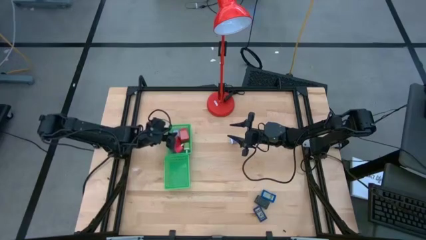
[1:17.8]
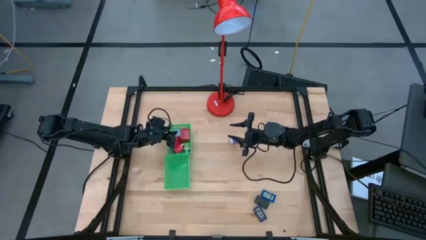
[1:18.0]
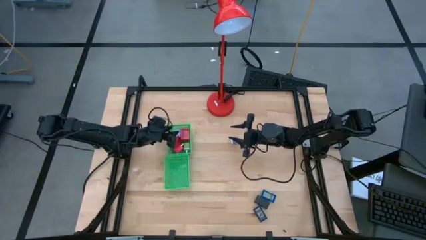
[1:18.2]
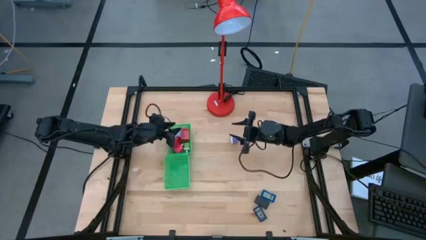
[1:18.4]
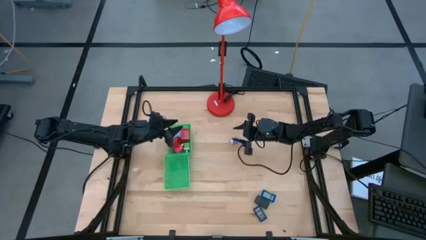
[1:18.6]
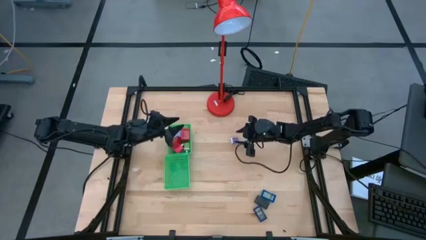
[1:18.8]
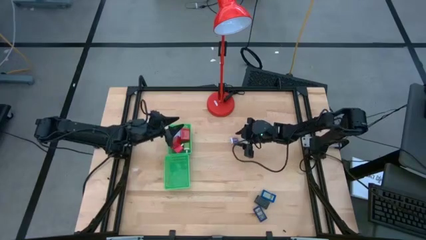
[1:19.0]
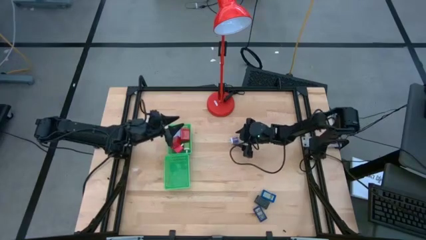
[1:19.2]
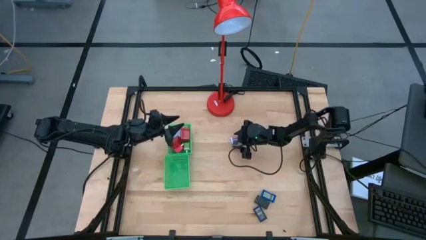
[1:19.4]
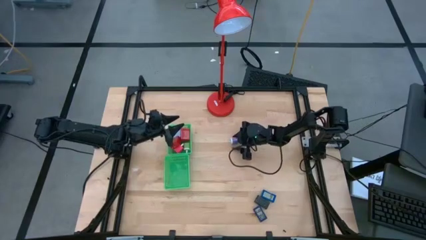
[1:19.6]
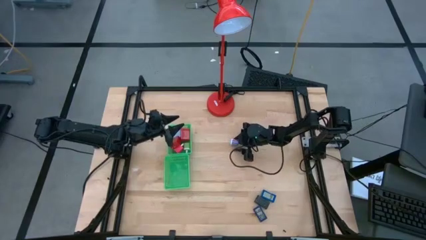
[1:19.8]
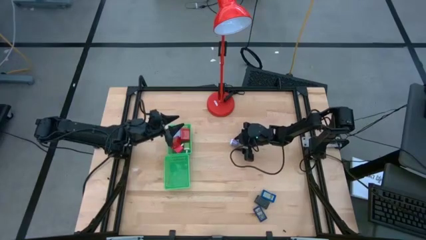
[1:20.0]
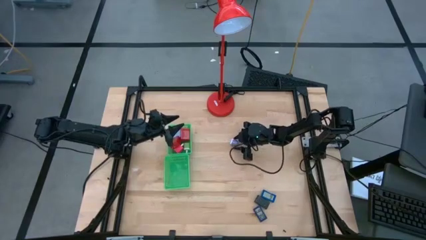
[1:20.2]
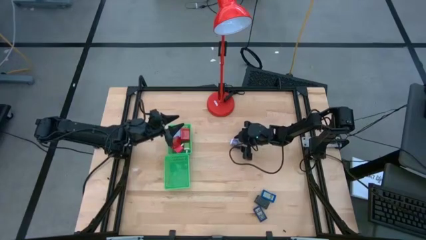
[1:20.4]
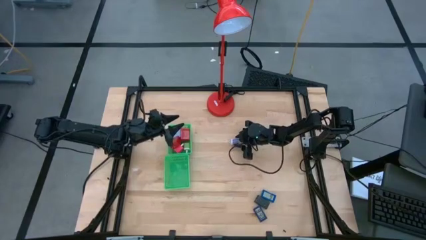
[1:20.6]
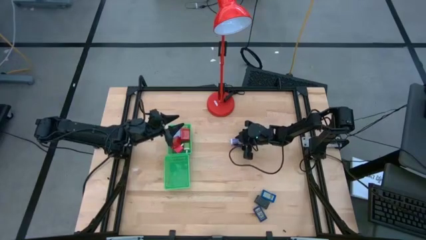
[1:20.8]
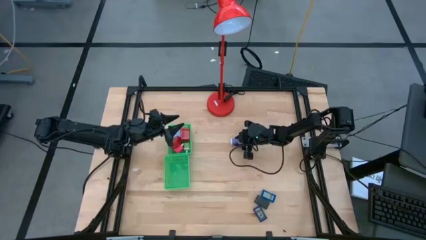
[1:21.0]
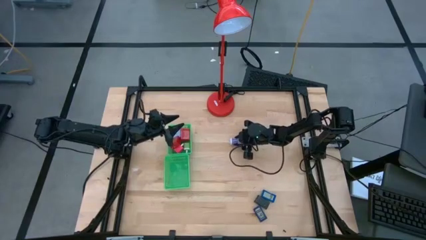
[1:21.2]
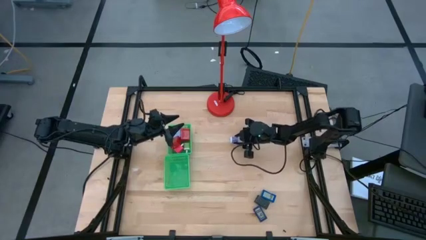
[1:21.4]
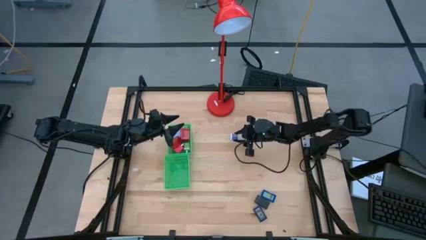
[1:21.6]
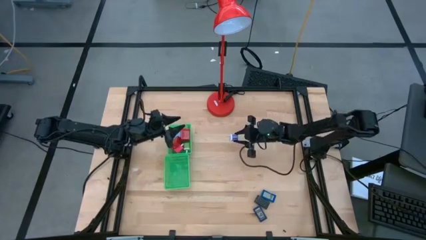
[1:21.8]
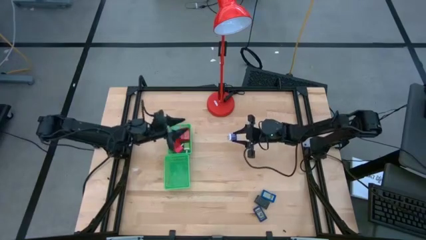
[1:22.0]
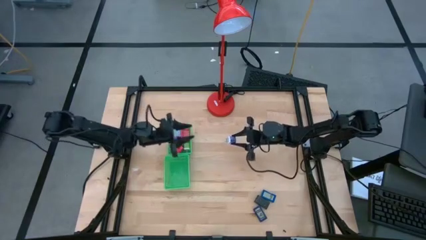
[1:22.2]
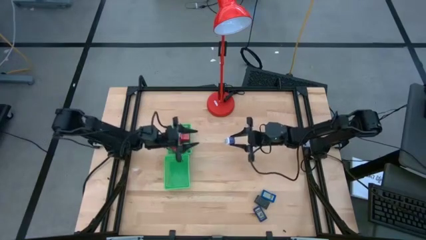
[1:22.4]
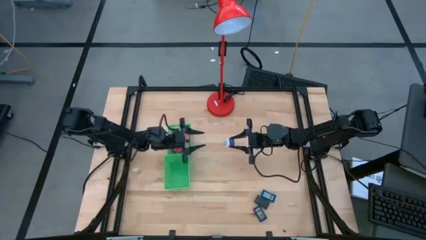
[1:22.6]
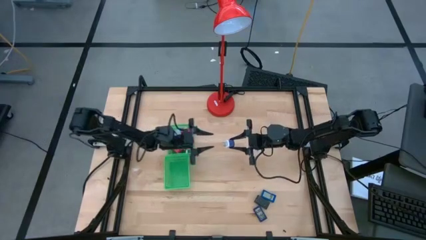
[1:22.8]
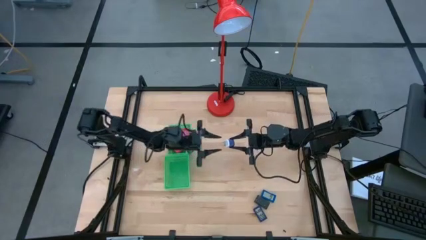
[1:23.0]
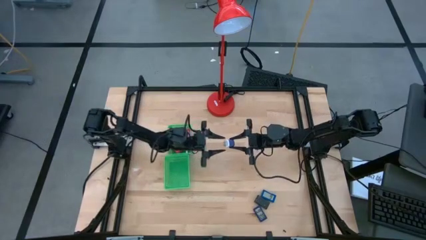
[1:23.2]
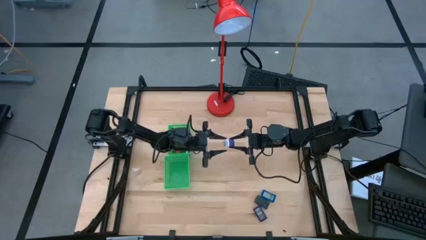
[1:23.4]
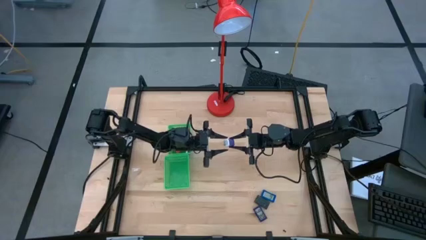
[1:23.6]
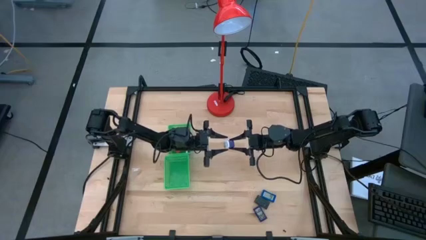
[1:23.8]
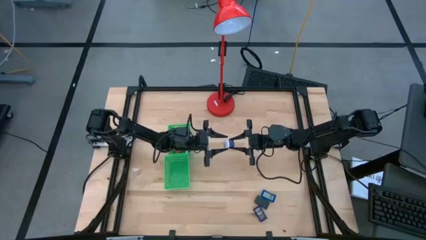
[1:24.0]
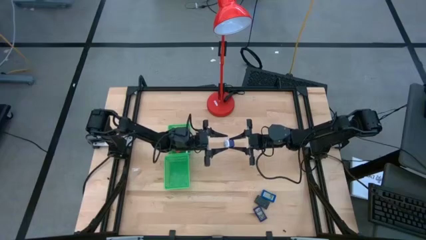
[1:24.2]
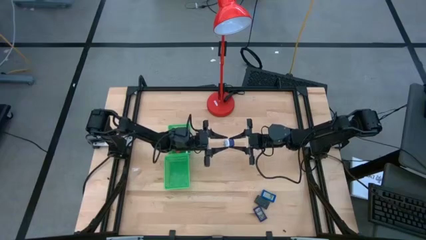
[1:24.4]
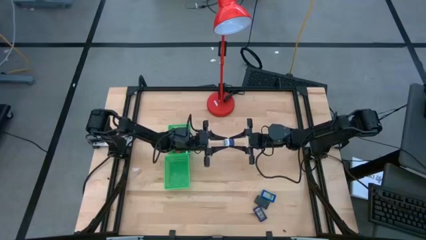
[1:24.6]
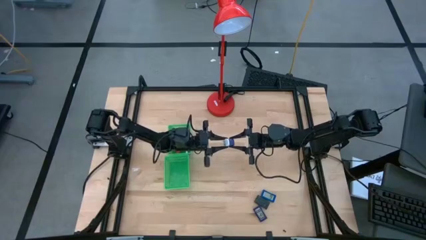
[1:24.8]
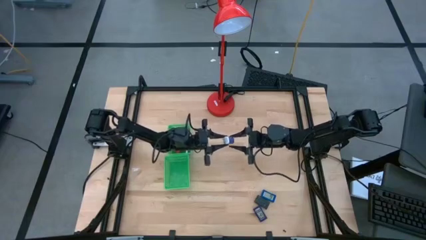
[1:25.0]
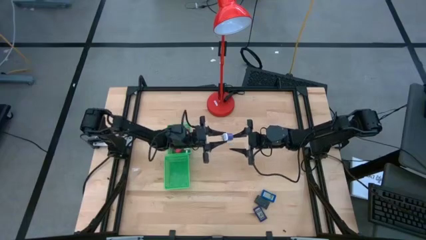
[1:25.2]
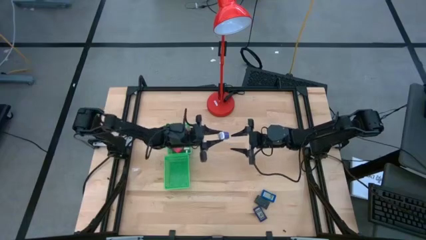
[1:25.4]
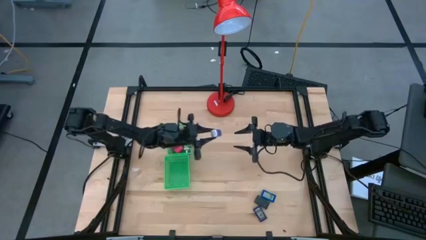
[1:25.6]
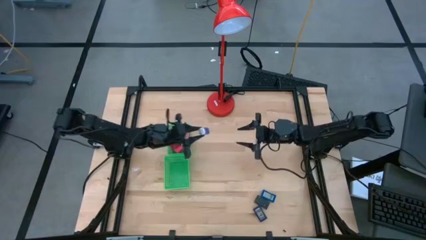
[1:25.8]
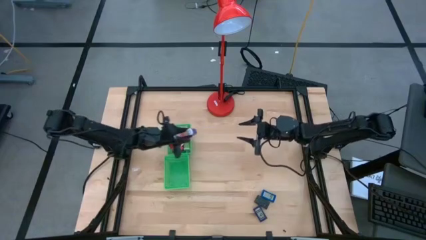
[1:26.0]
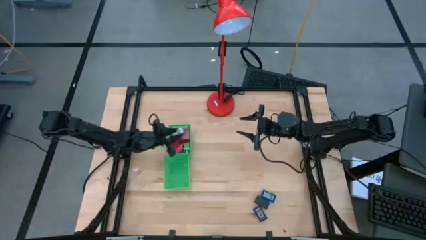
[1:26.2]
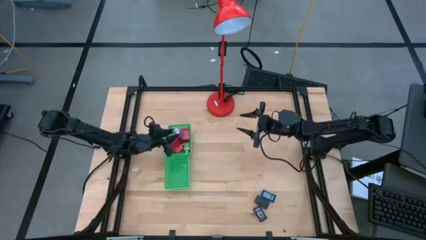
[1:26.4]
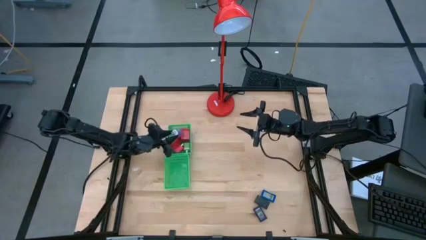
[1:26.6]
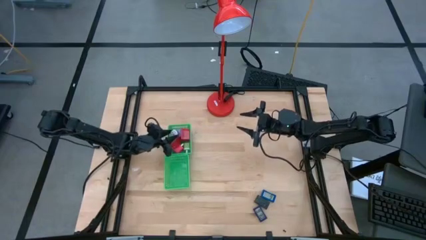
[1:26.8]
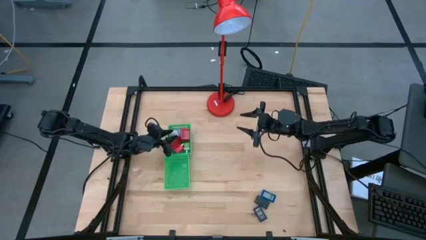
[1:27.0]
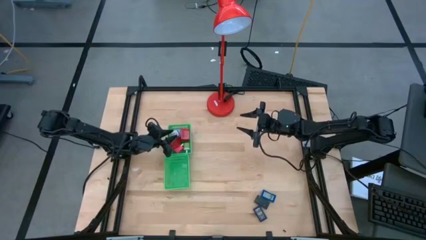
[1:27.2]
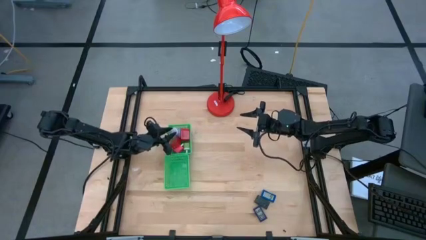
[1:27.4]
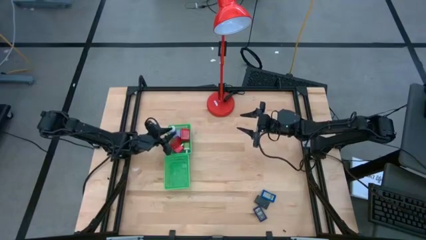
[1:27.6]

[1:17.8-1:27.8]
Task: Pick & Place Office items
Put the violet charger adapter into the top green bin

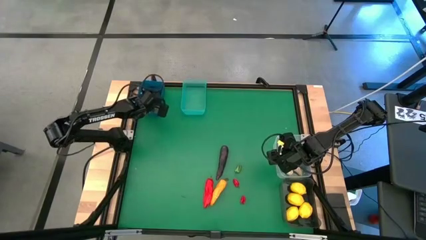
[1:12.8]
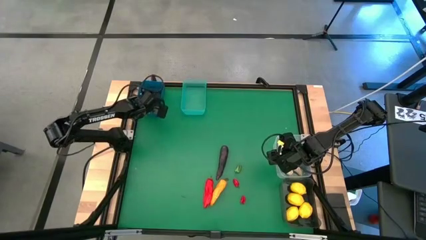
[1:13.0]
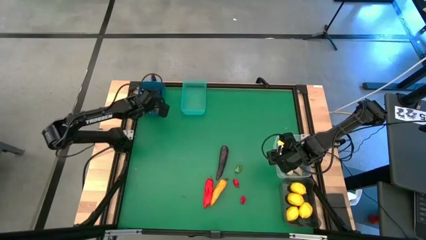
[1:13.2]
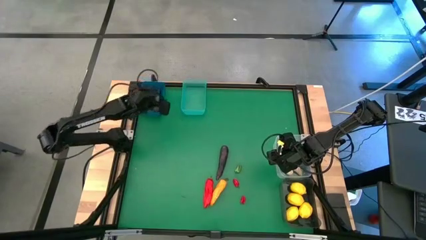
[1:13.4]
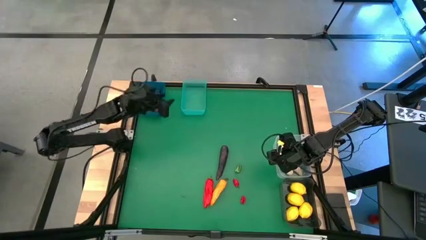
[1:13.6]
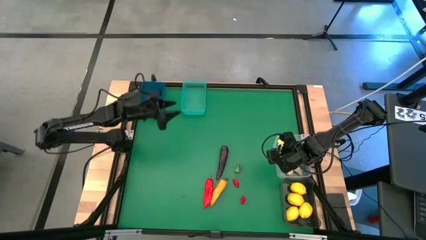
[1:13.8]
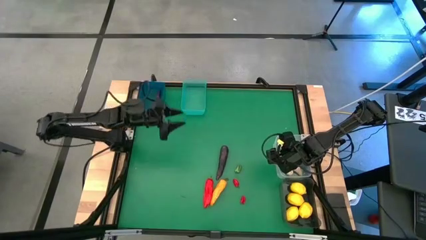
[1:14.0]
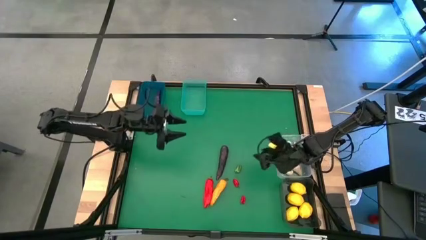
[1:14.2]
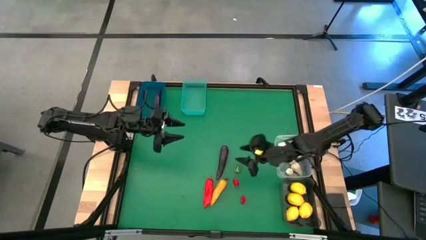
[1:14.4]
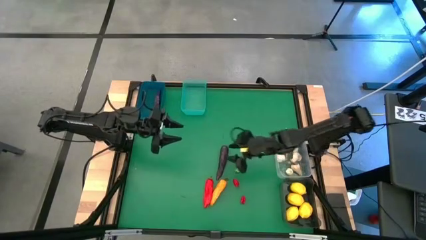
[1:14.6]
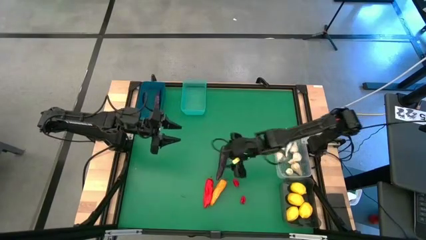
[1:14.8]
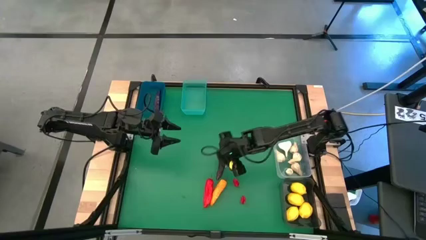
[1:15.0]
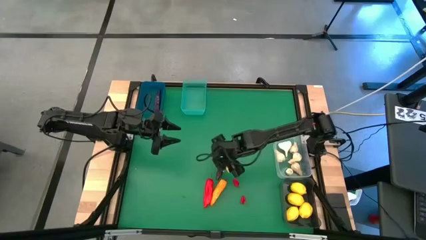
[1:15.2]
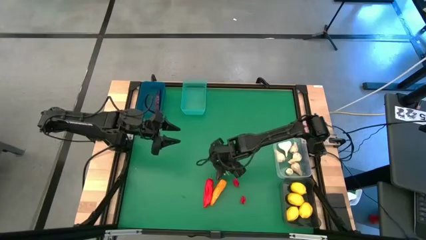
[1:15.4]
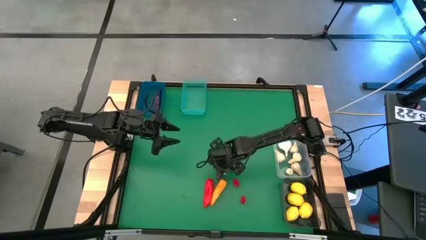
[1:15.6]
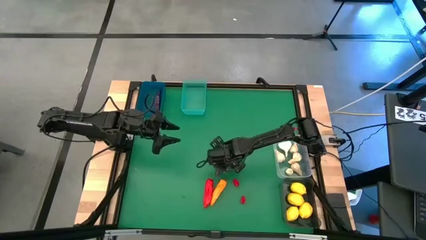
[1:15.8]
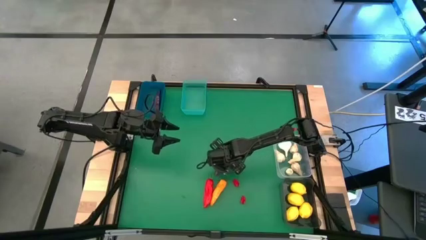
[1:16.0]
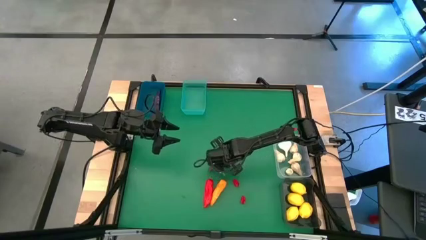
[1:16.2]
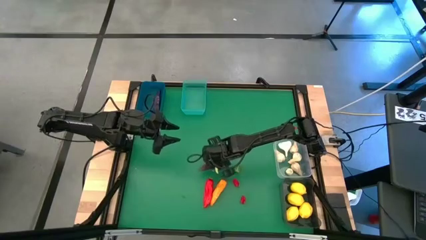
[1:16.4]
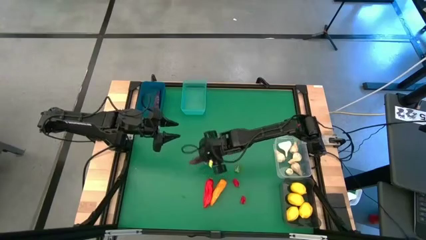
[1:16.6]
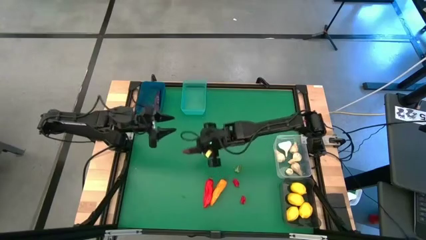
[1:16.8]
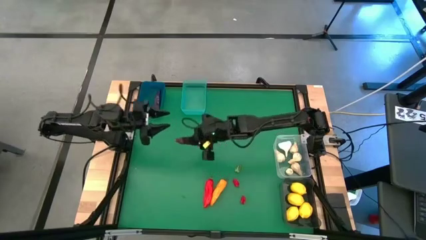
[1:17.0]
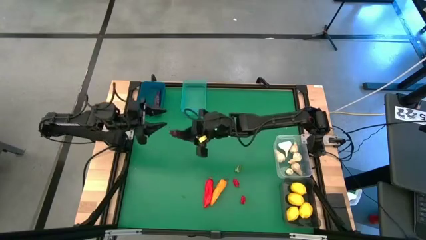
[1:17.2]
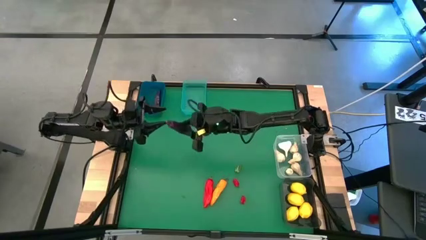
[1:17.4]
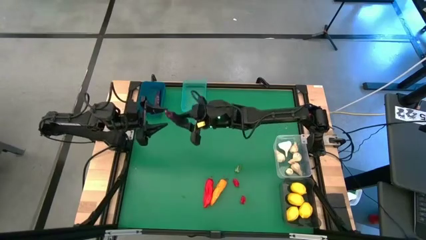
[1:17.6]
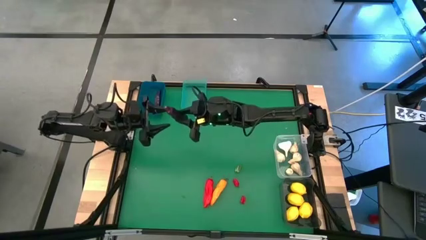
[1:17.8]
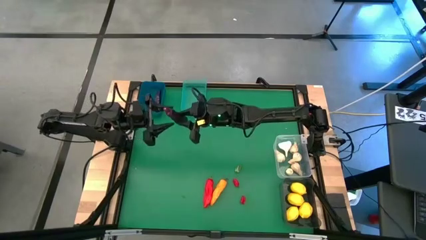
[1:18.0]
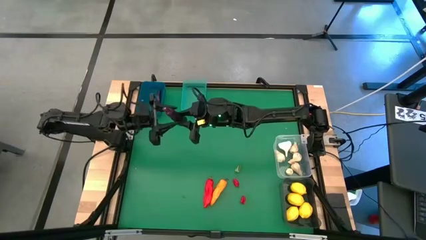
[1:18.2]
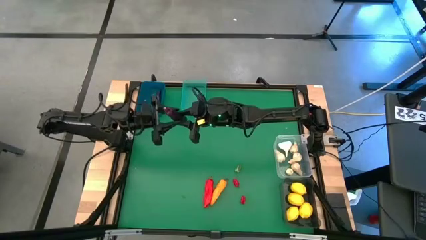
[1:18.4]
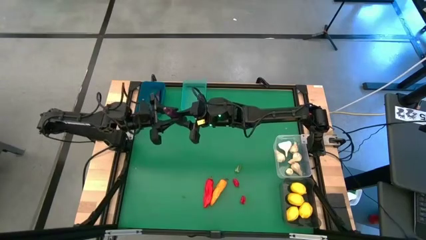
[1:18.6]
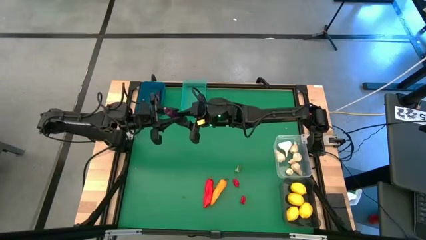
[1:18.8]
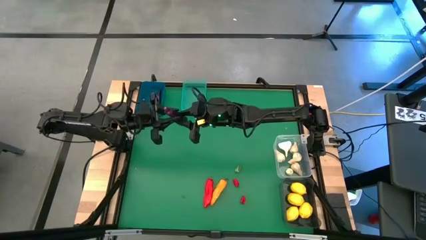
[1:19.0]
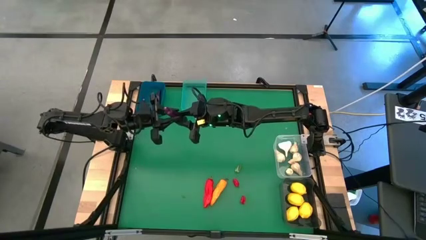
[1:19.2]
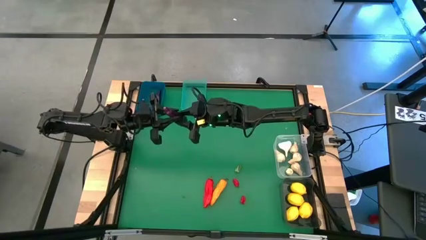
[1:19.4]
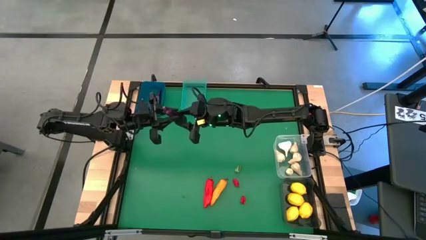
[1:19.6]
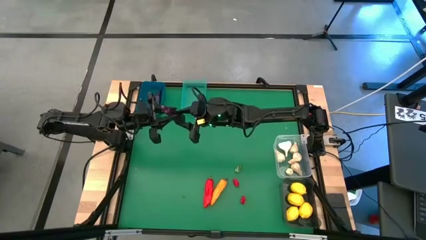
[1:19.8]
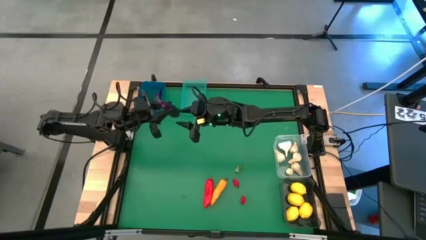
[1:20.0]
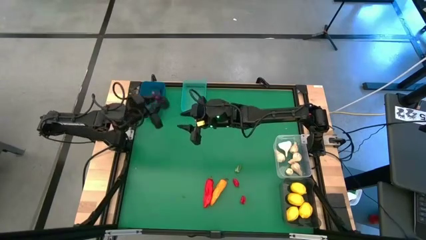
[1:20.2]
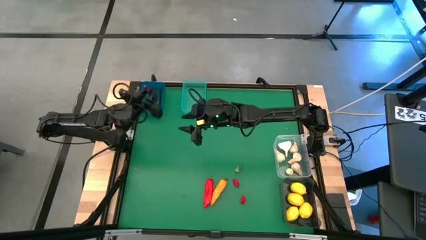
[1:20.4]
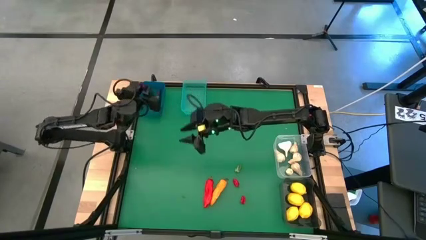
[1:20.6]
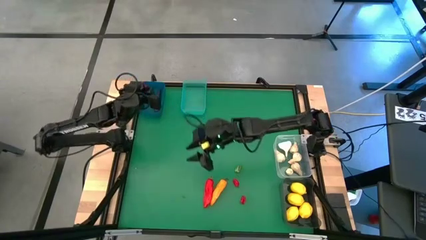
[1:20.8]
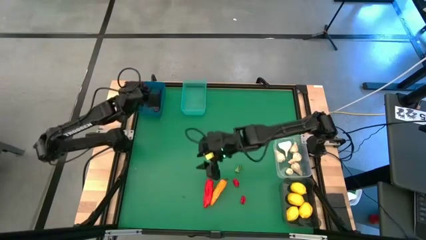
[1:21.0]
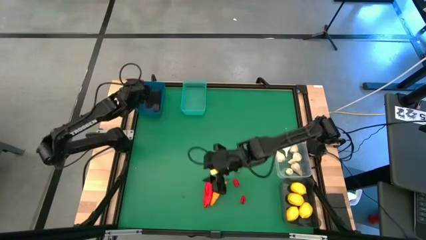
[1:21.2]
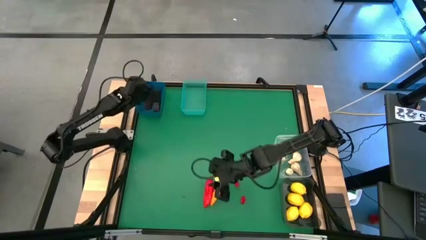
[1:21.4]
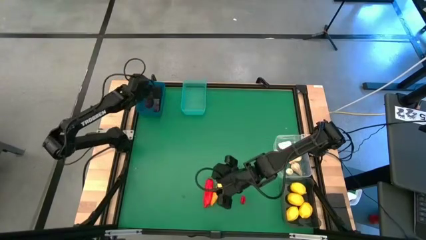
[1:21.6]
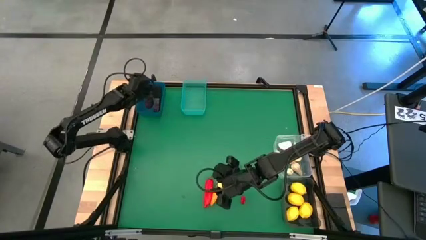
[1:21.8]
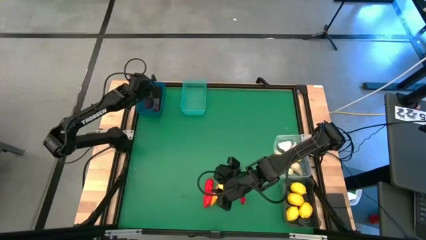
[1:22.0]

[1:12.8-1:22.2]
Task: Sort produce into baskets
Put the purple eggplant into the blue bin
